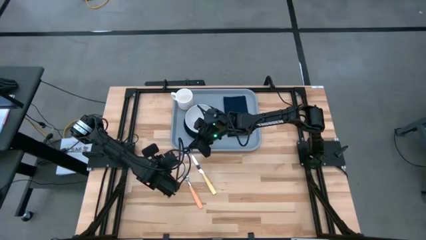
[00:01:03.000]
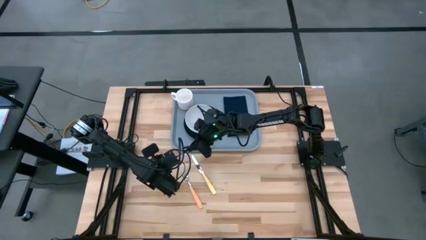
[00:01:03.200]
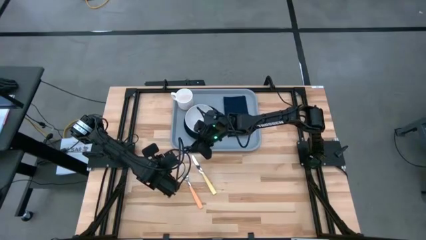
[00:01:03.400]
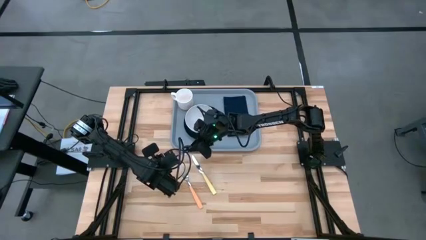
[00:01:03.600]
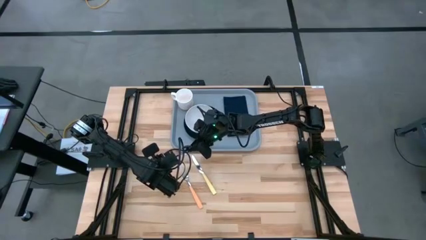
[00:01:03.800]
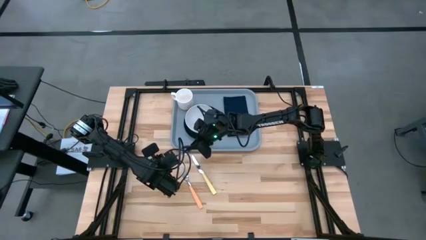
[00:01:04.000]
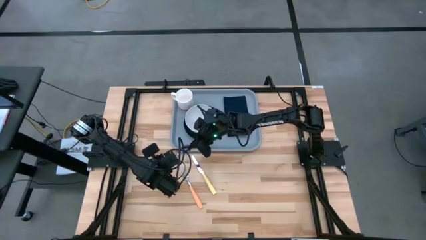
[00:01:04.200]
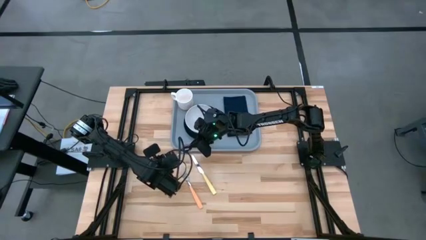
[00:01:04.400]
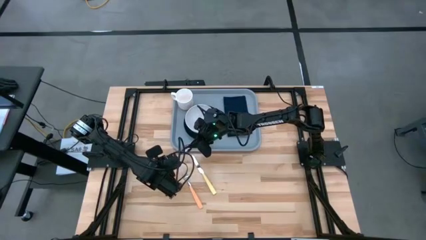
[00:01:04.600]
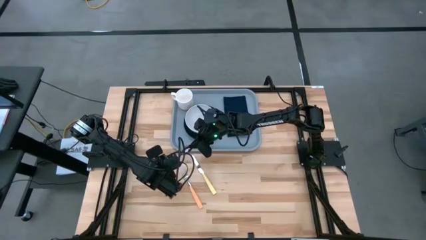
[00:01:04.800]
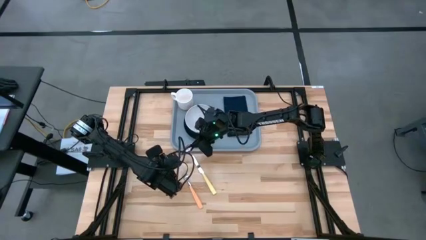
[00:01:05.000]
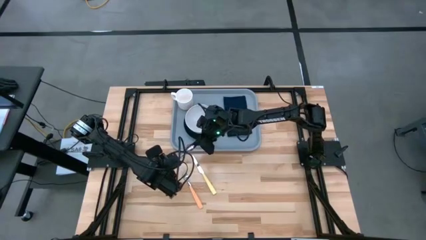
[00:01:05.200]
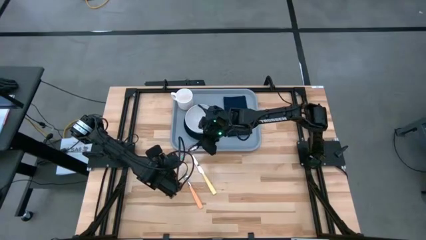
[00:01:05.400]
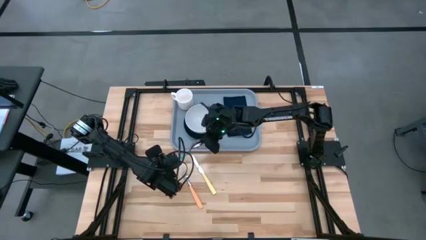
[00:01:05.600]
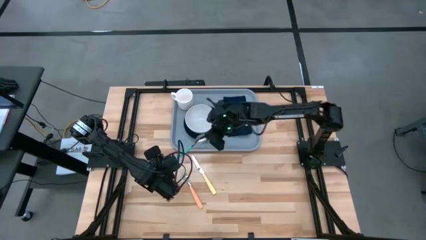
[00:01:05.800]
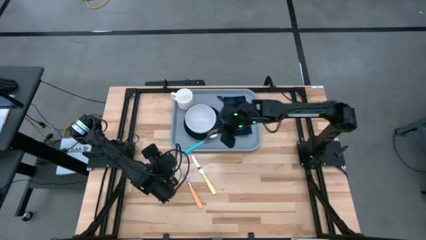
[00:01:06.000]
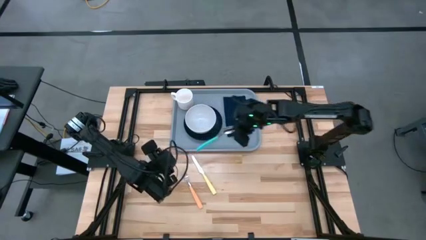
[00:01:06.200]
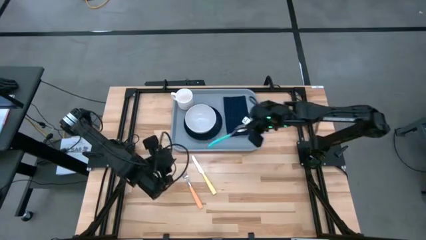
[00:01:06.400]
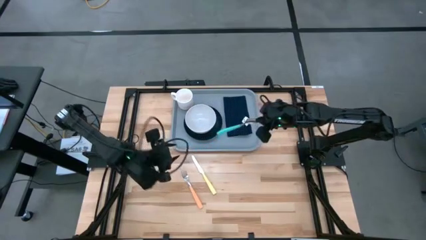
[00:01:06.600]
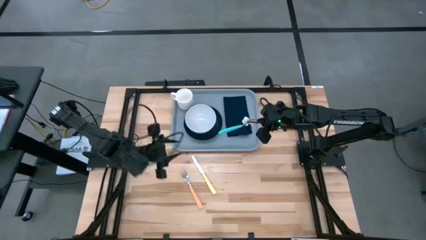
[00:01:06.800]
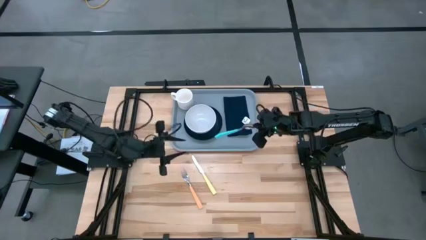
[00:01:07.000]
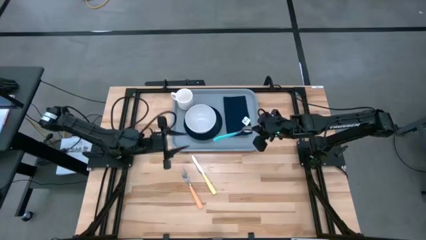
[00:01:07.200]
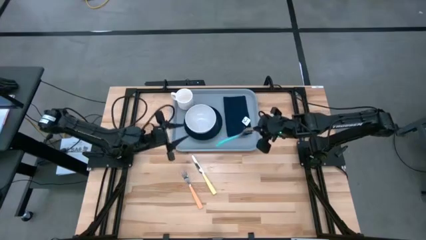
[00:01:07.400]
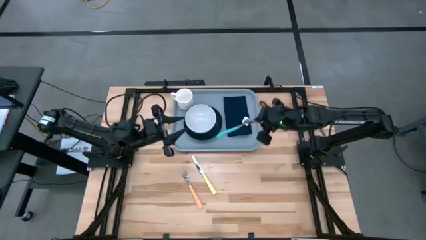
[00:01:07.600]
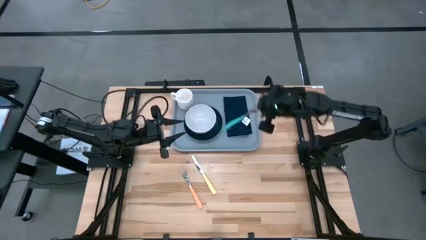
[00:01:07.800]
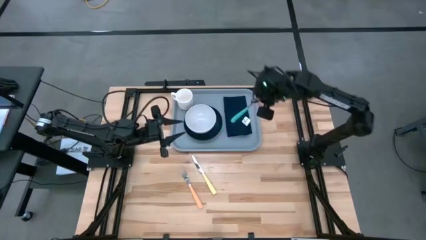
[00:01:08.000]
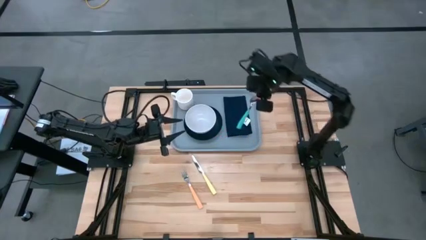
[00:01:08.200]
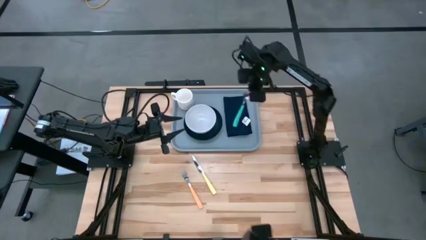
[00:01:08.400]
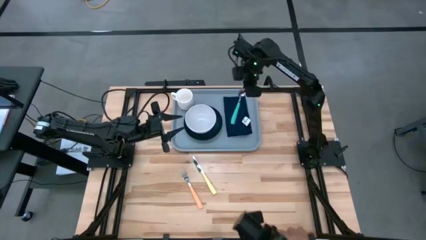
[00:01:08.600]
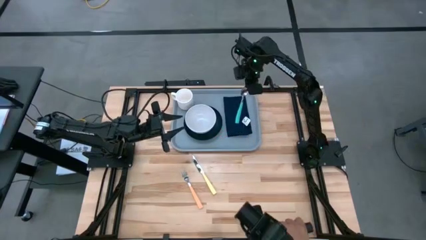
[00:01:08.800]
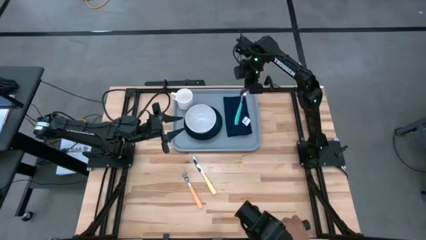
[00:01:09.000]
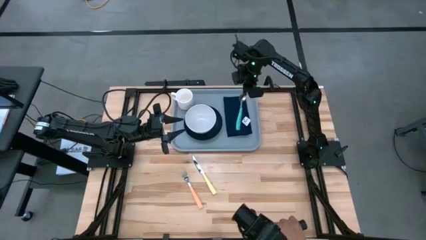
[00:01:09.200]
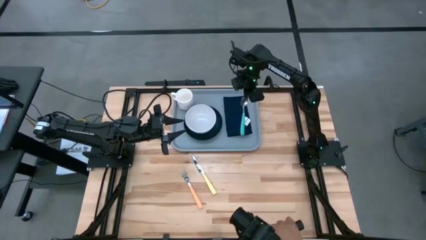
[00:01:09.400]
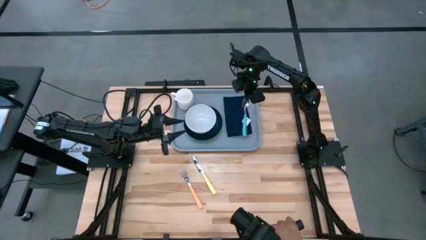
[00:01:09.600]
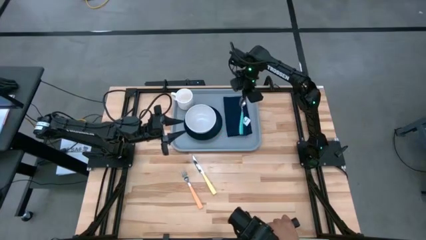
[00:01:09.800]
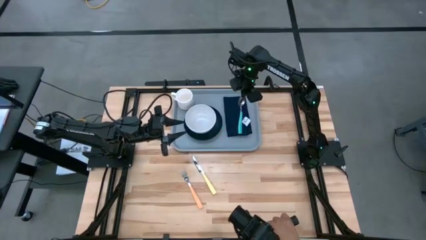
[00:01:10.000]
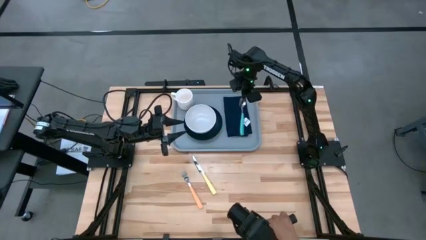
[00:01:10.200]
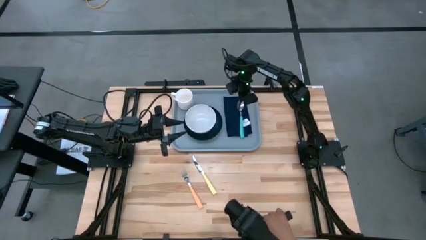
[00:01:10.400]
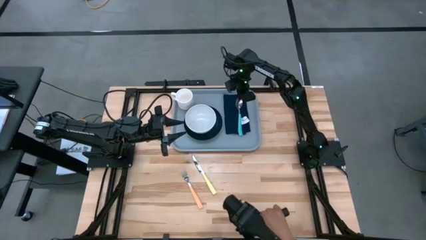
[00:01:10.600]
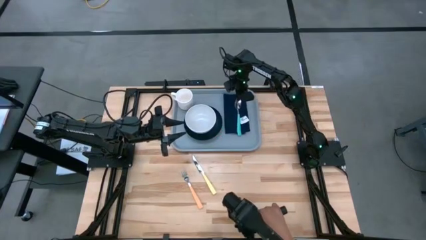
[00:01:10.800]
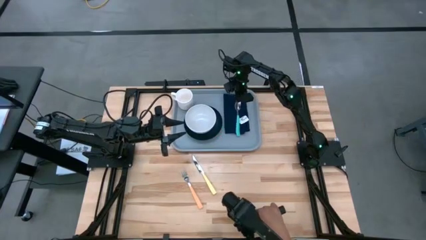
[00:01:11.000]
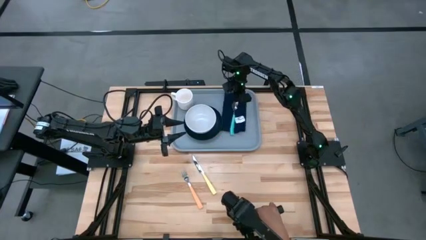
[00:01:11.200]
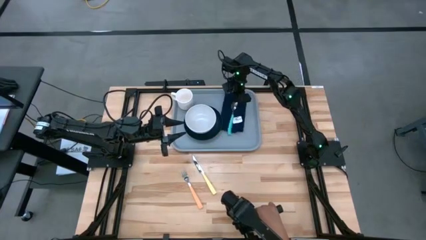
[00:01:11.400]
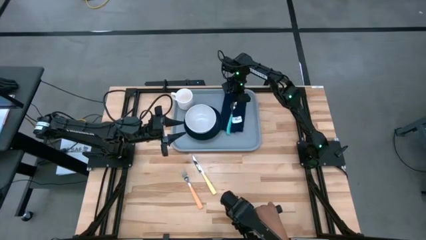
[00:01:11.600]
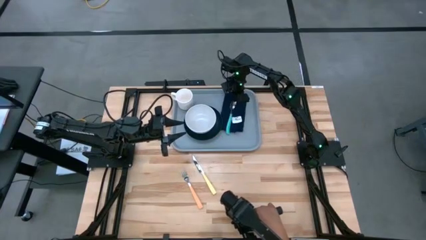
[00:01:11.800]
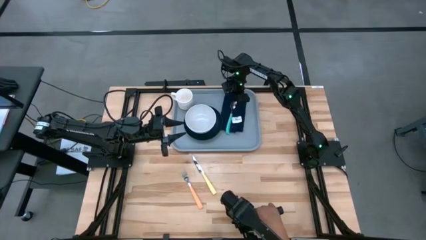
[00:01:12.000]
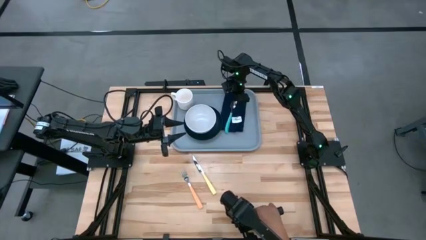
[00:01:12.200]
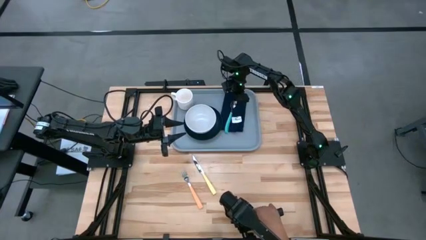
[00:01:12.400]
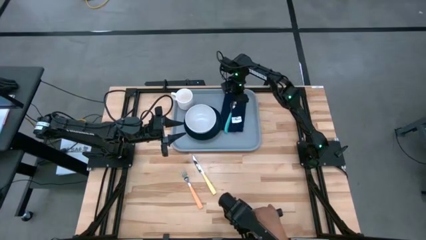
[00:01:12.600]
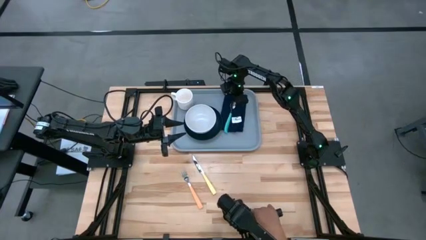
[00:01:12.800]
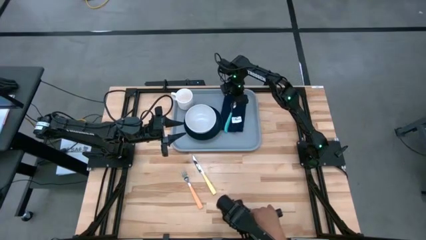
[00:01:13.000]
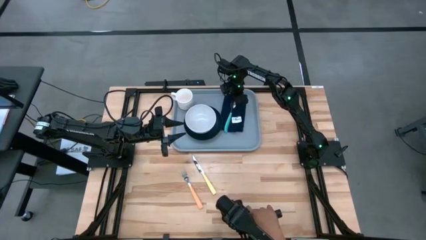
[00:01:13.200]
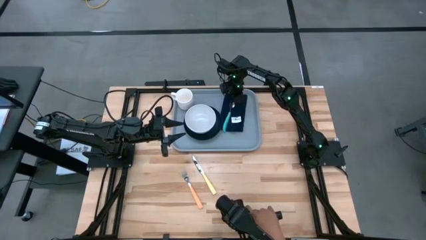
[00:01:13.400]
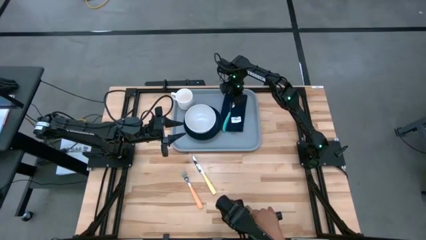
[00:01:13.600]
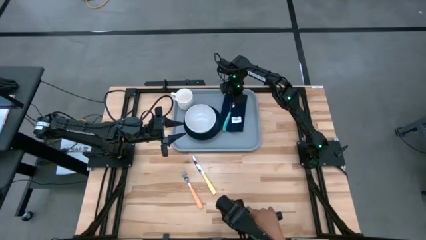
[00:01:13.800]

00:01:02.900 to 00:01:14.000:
Task: Set up tray
Put the blue spoon on the black napkin

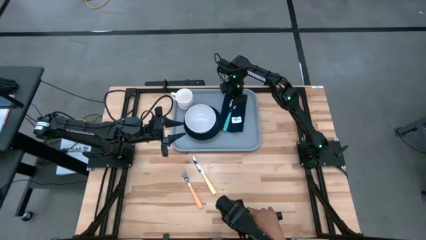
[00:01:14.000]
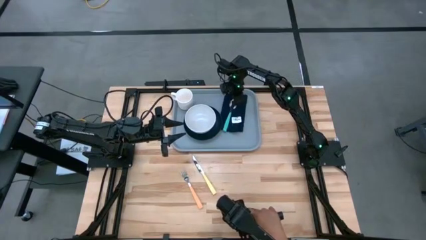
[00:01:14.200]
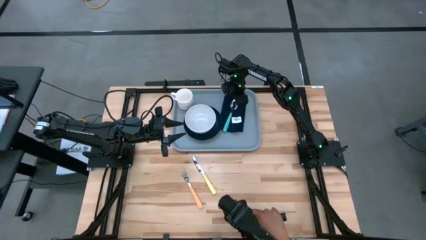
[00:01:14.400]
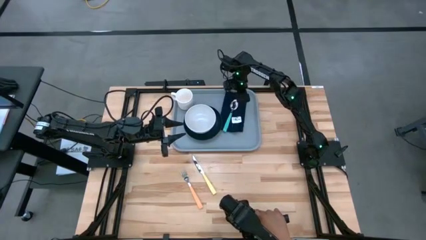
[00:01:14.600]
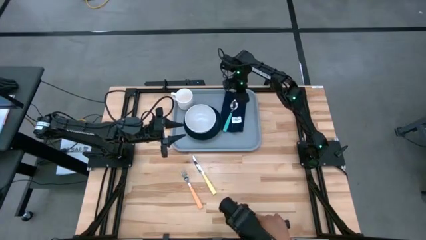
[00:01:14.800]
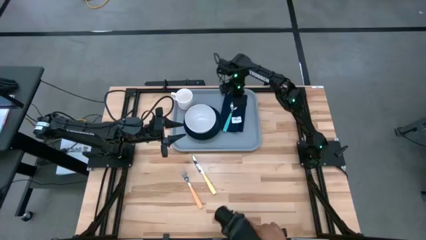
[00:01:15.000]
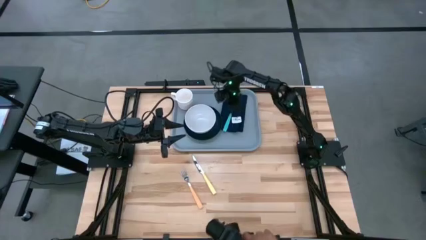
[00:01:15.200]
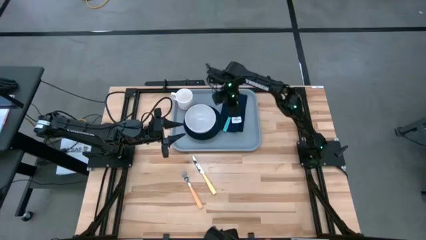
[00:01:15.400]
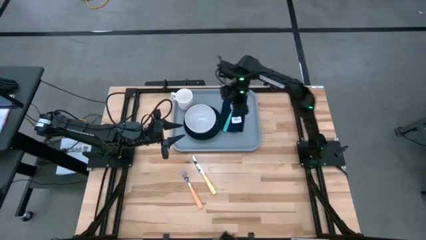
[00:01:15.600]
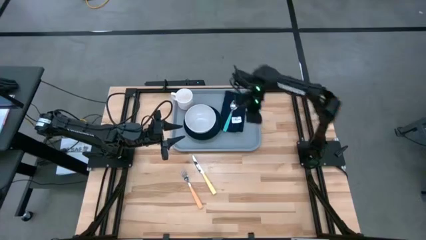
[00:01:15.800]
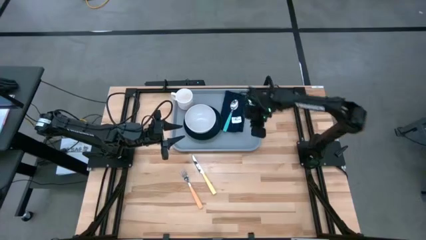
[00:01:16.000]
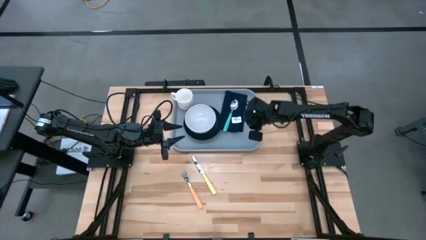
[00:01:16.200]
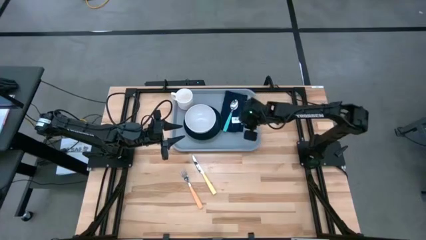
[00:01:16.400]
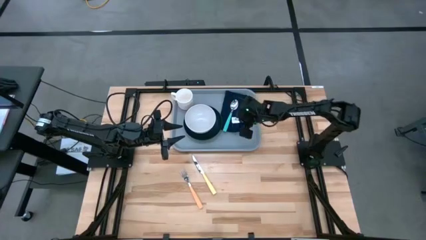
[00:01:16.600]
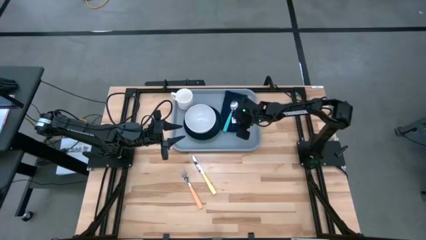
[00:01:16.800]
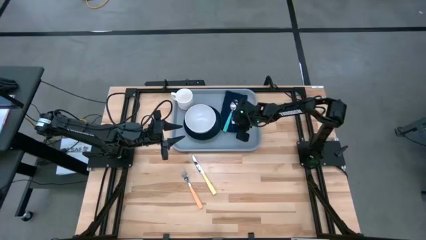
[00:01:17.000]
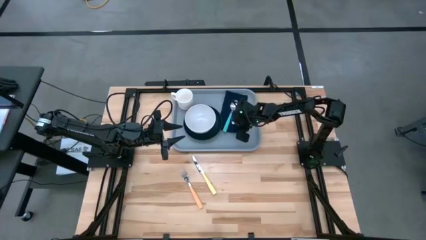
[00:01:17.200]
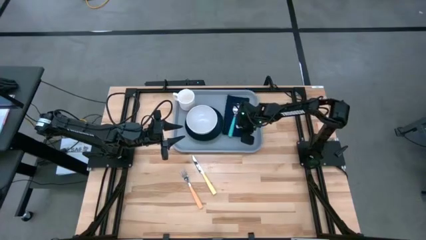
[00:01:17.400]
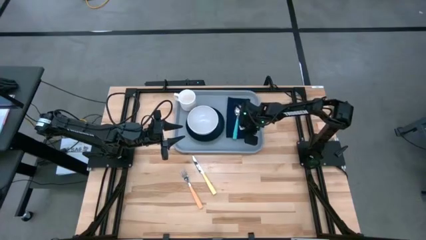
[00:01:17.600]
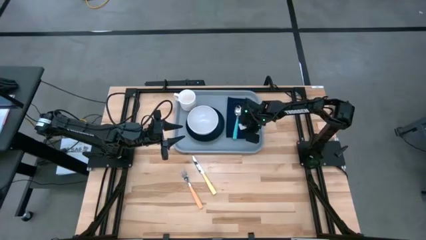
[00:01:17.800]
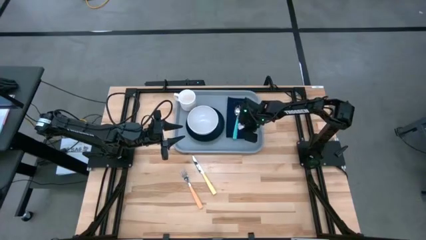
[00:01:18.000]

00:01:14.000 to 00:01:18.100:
Adjust the black napkin
